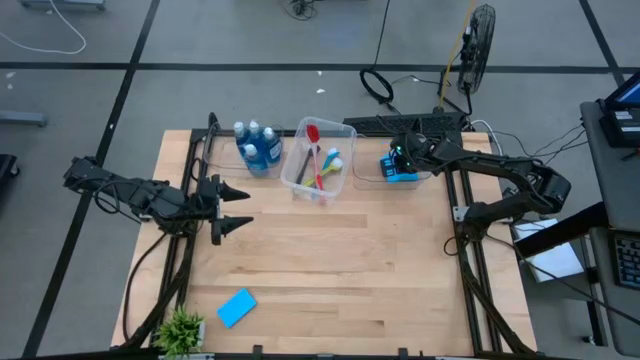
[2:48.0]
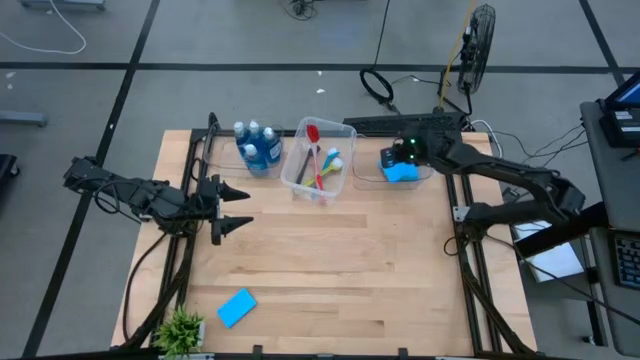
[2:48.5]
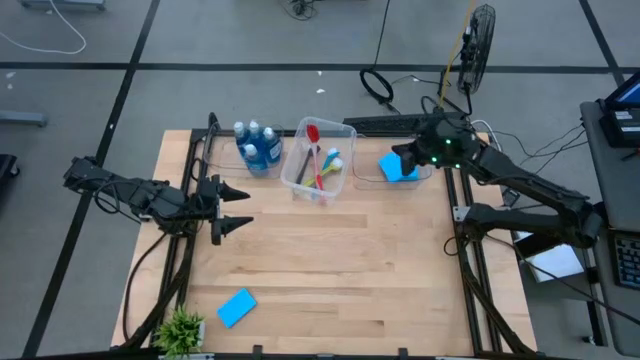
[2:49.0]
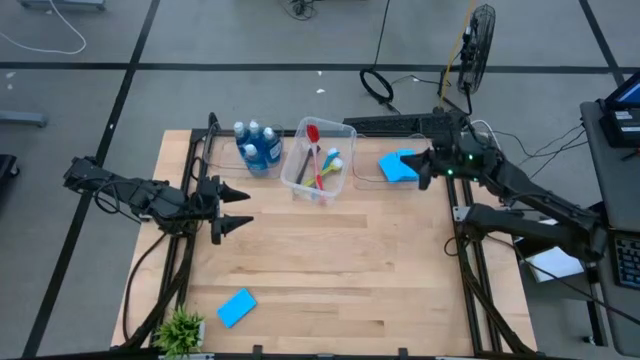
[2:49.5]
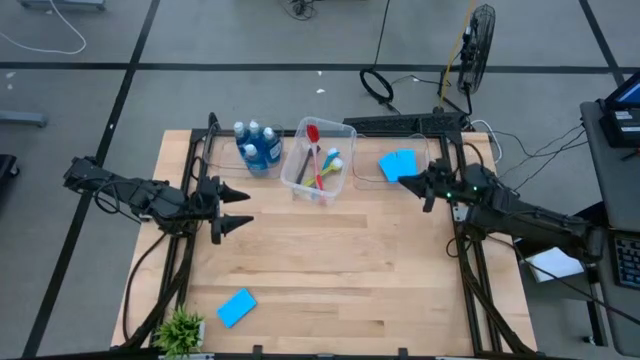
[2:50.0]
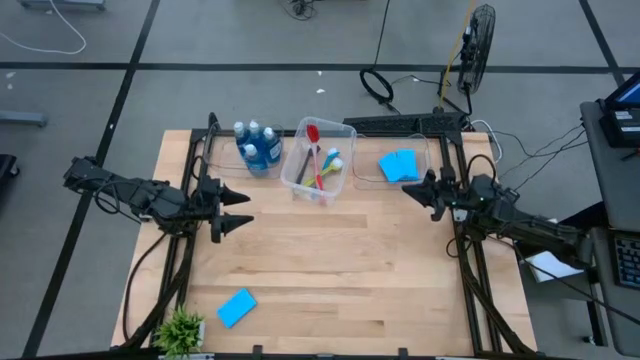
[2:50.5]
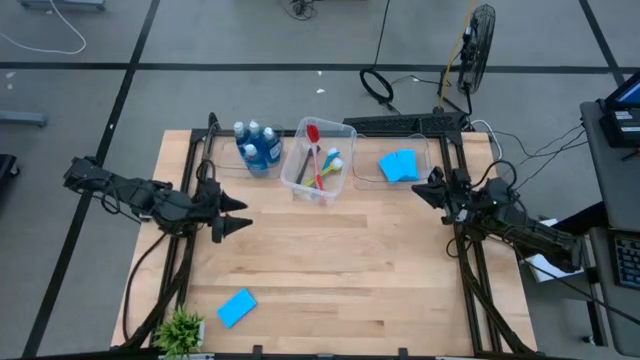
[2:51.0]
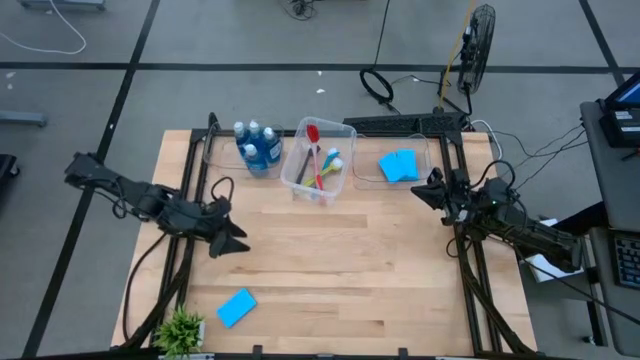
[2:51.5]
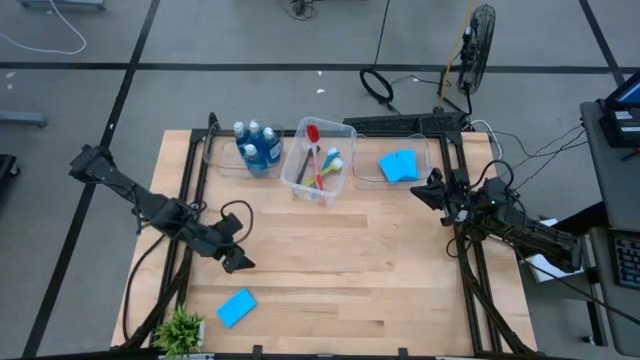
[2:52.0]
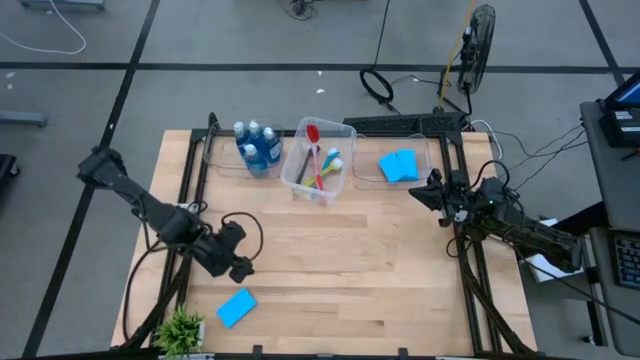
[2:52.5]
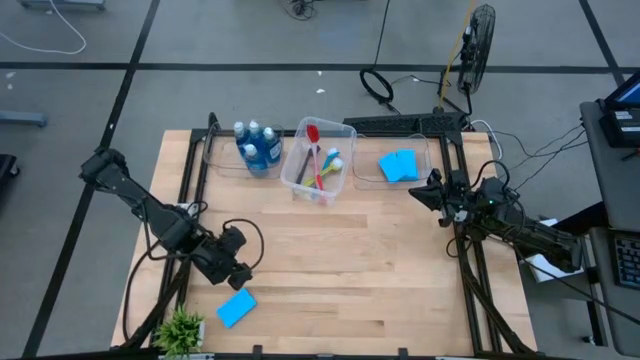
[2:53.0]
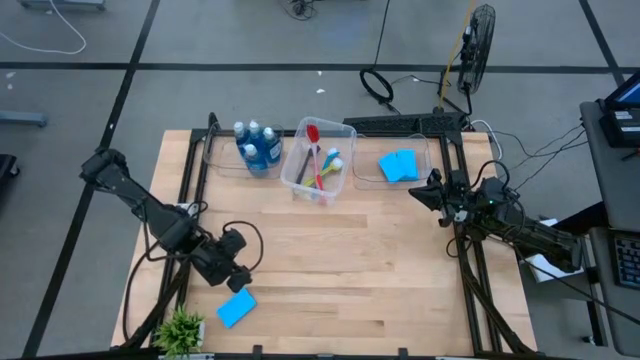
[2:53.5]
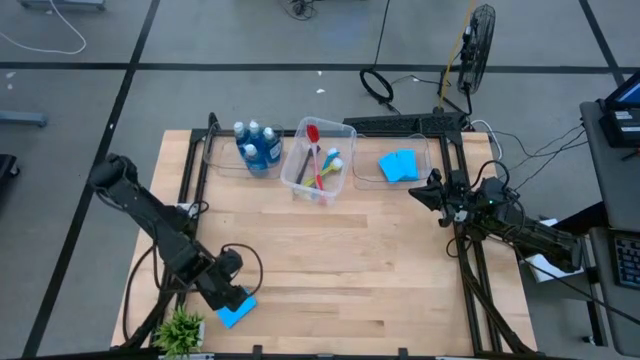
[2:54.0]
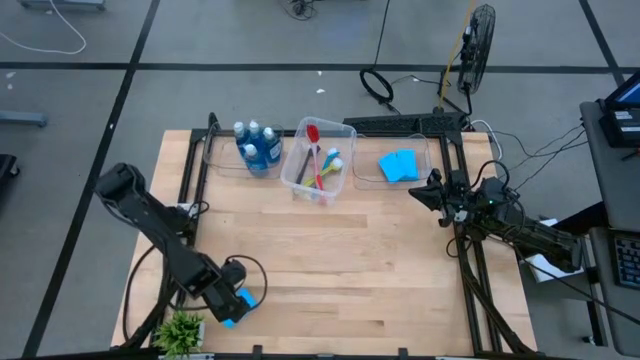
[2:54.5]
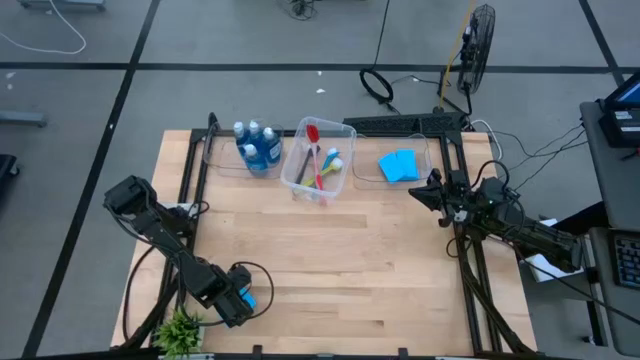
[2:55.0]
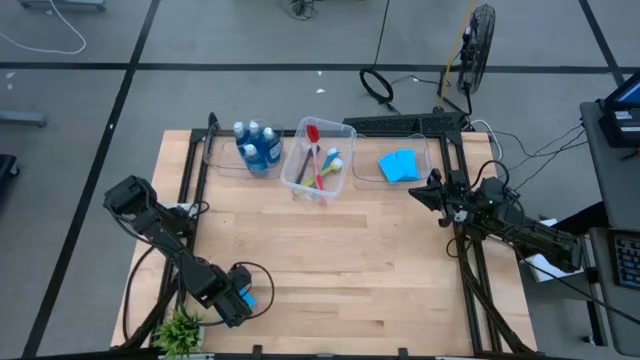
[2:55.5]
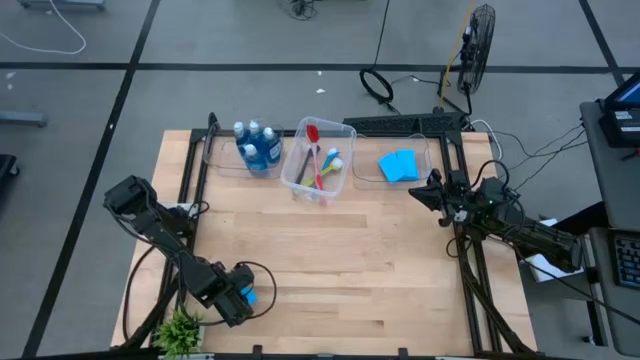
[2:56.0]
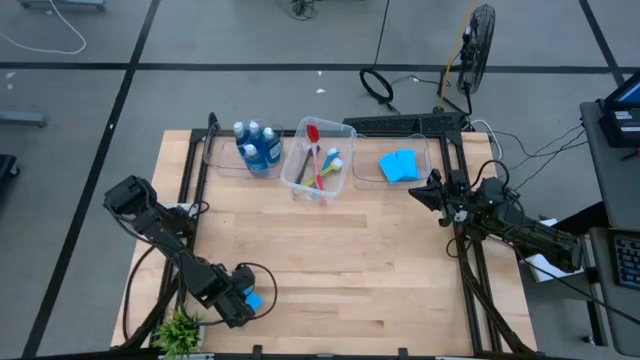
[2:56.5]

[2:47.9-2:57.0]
Task: Pick & Place Kitchen Sink Supplies
Put the blue sponge into the right transparent bin

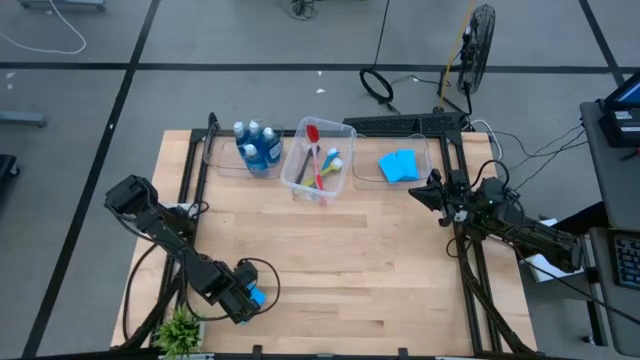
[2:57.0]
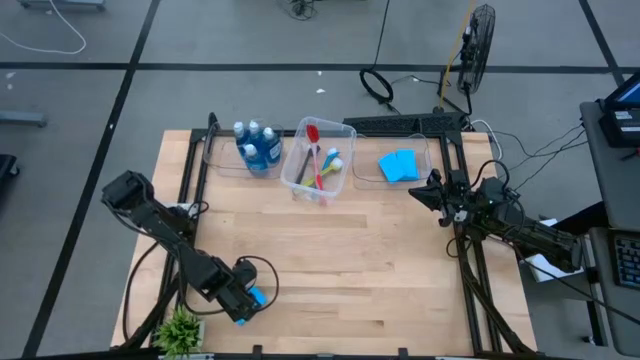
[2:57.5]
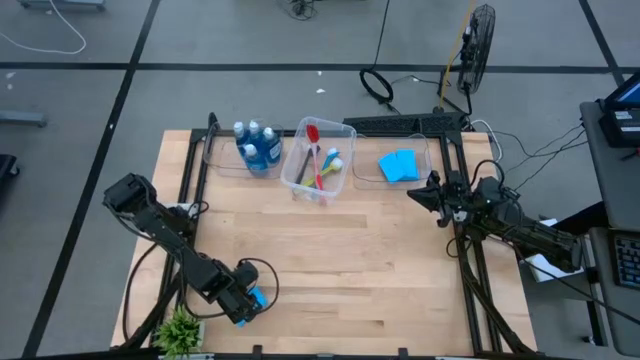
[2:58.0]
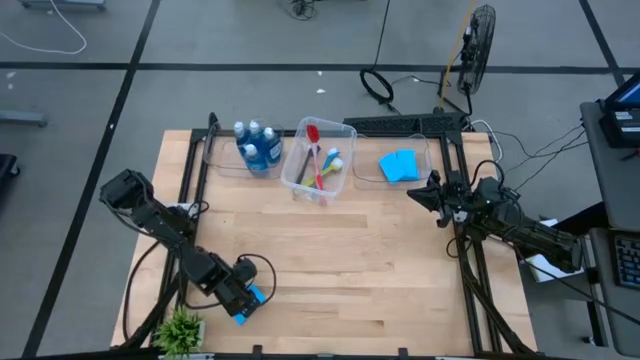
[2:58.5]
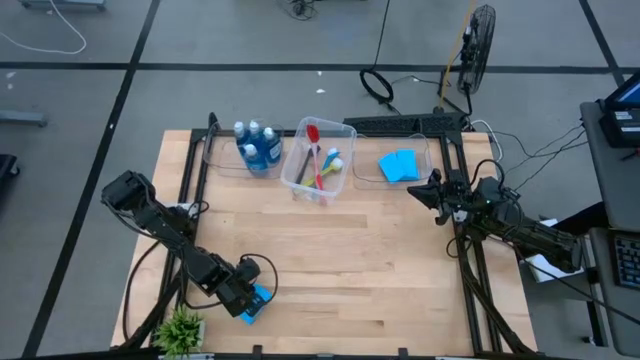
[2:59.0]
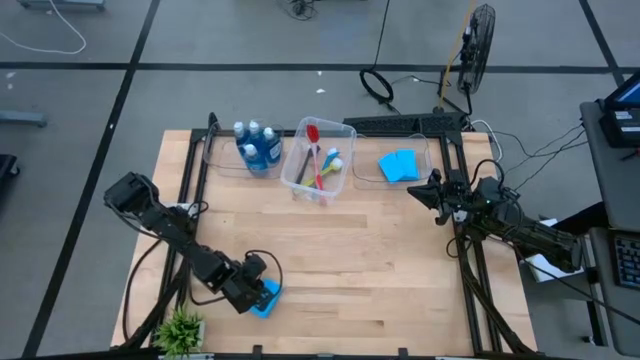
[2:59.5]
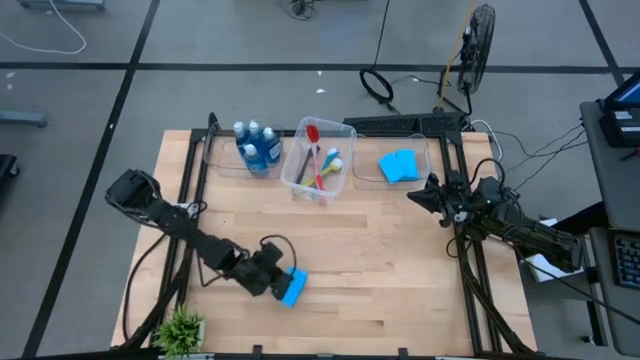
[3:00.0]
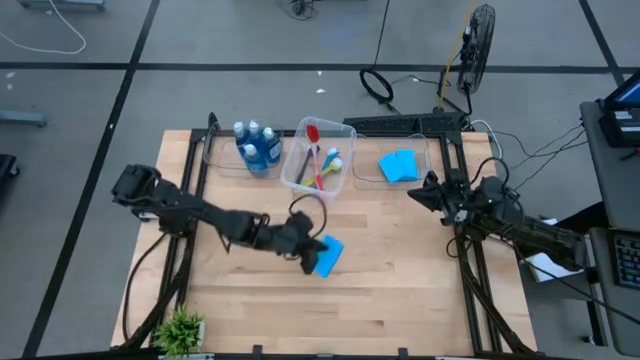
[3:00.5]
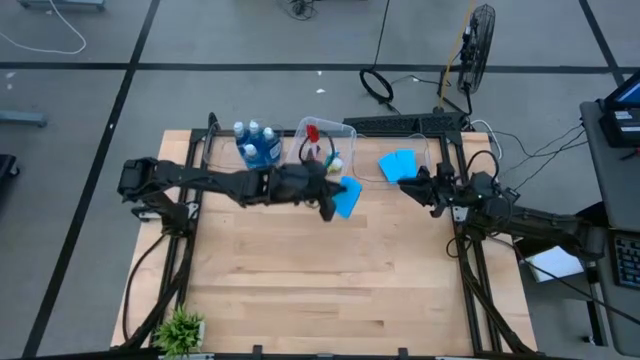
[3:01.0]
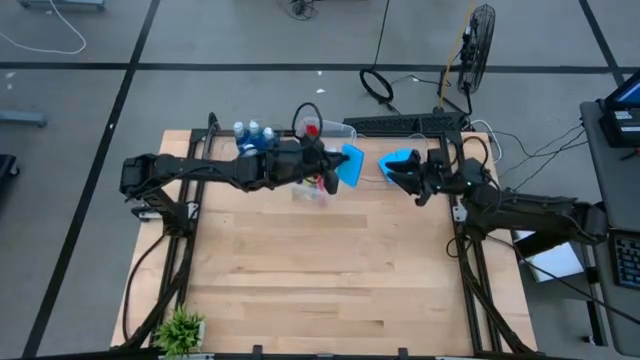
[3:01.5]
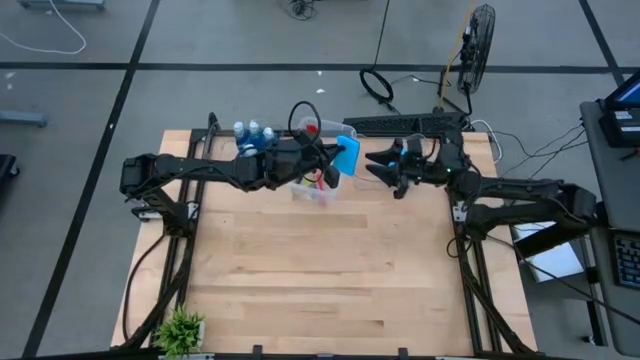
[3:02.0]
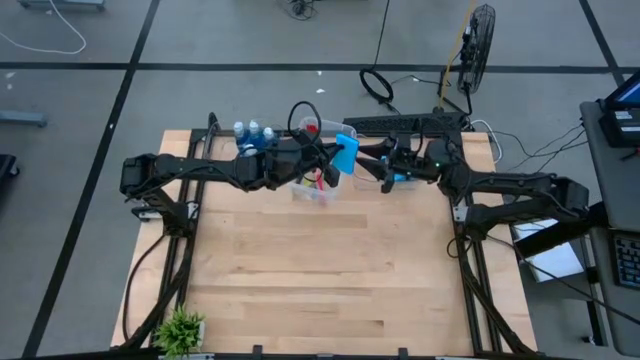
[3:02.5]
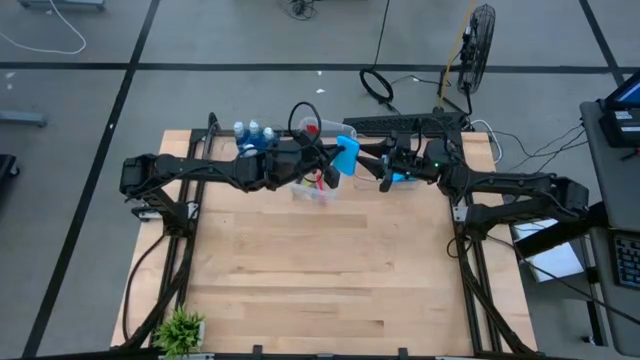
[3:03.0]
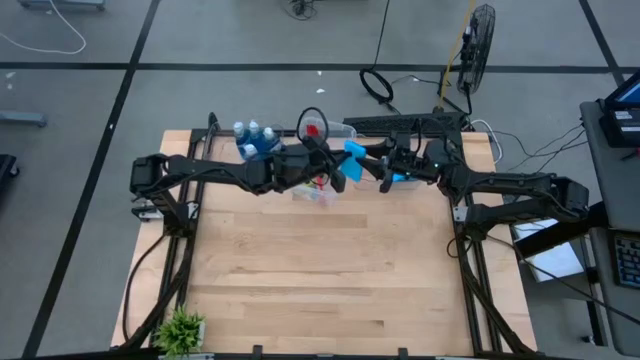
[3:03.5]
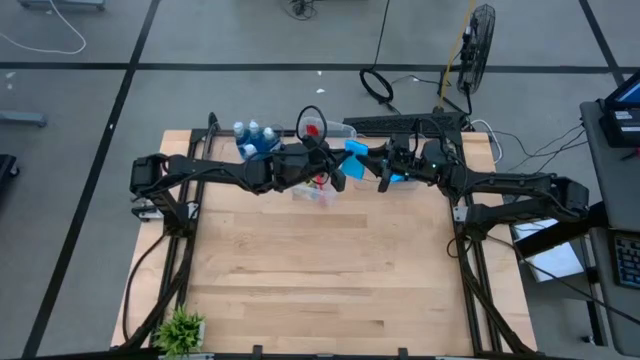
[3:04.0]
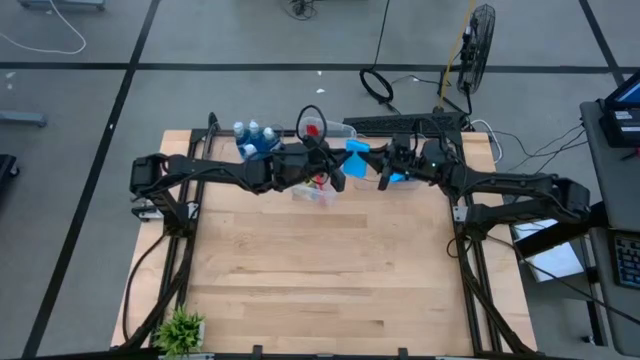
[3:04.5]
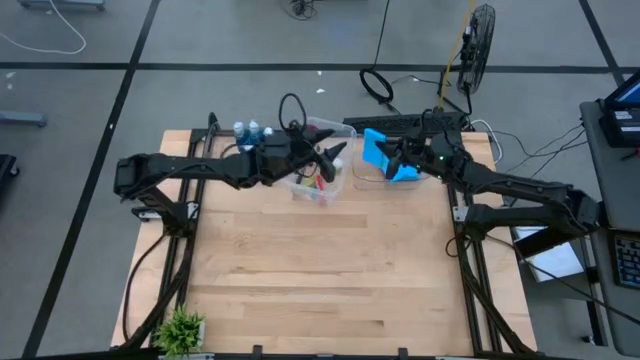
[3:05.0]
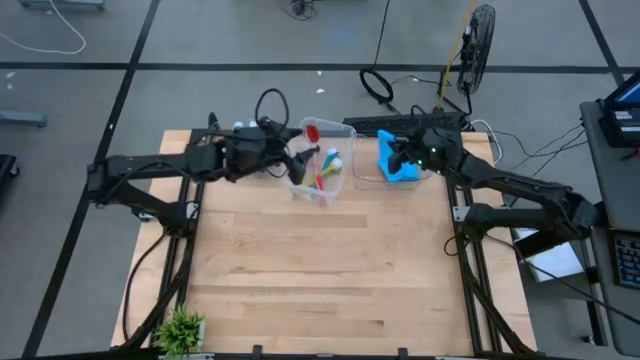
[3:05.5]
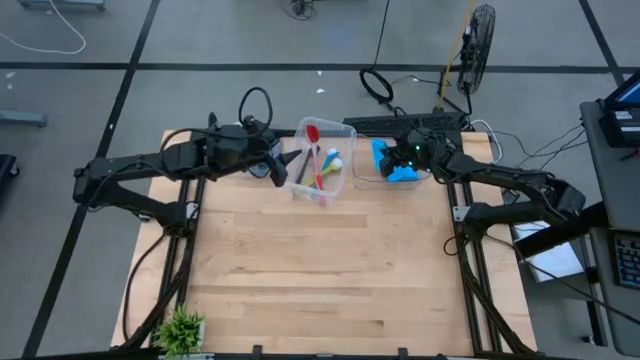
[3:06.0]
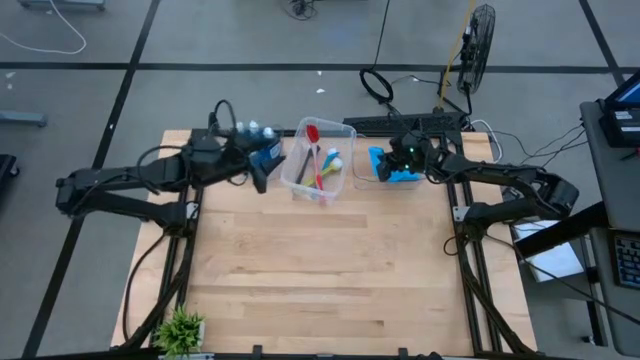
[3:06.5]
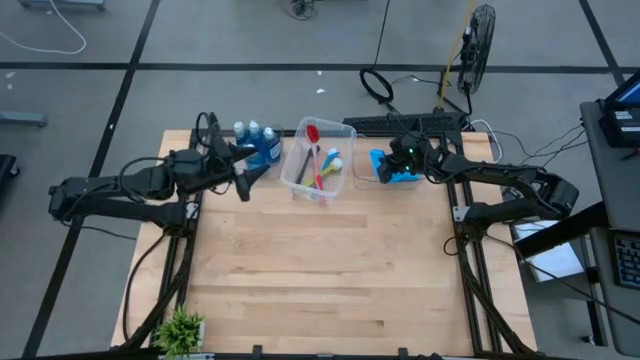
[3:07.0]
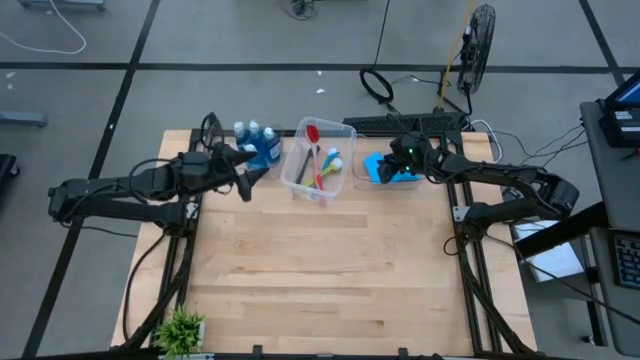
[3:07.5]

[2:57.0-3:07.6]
Put the blue sponge into the right transparent bin
